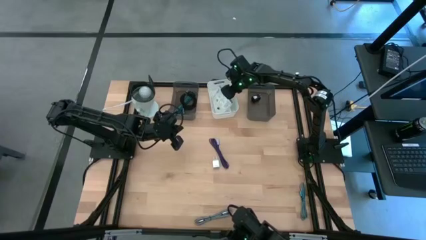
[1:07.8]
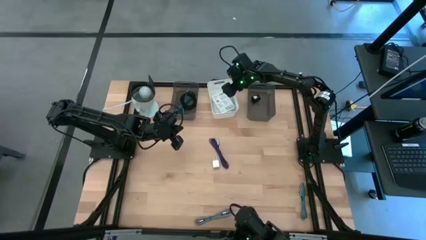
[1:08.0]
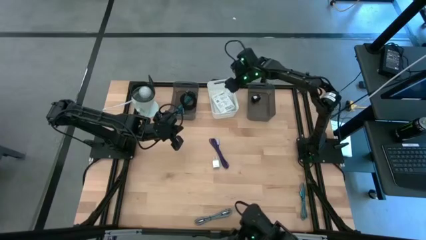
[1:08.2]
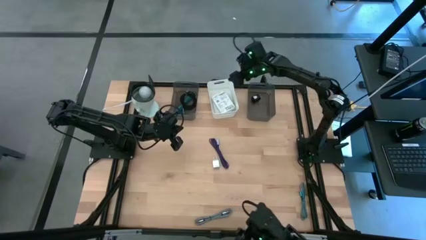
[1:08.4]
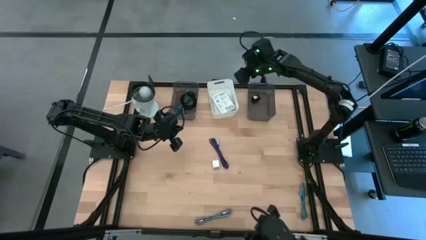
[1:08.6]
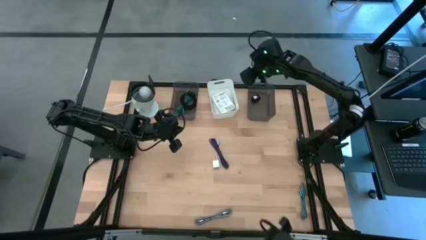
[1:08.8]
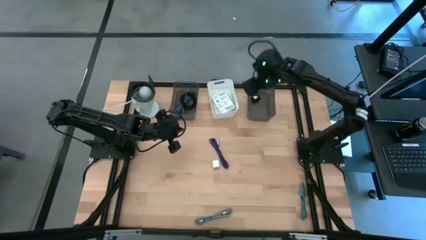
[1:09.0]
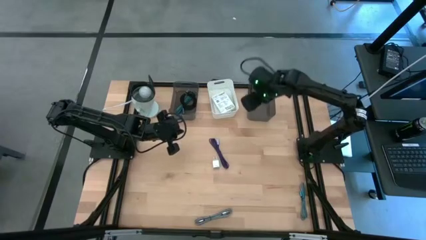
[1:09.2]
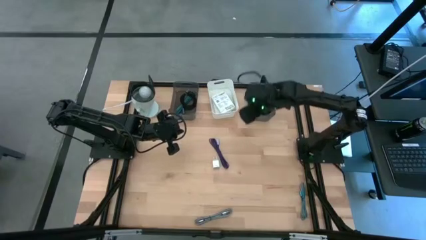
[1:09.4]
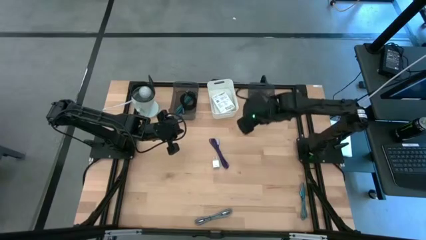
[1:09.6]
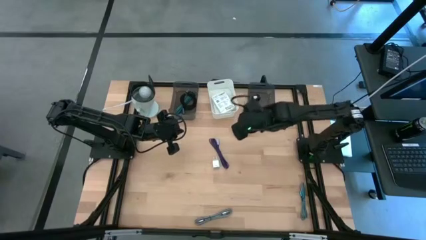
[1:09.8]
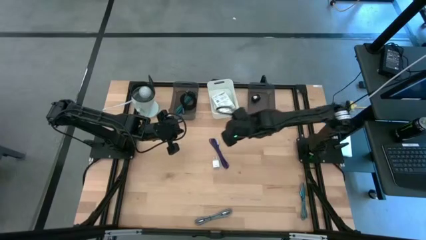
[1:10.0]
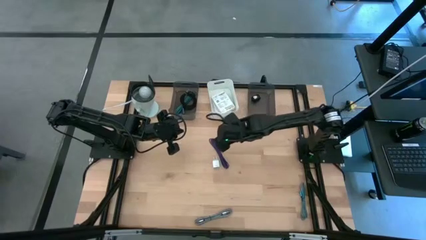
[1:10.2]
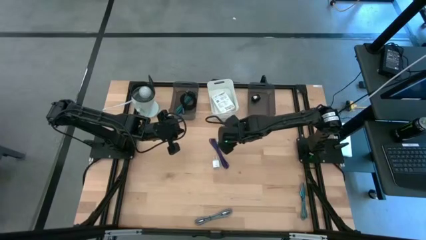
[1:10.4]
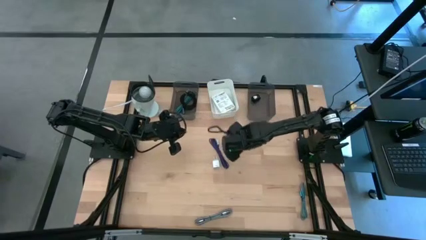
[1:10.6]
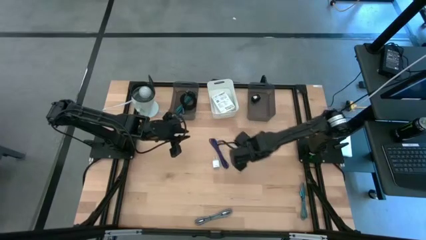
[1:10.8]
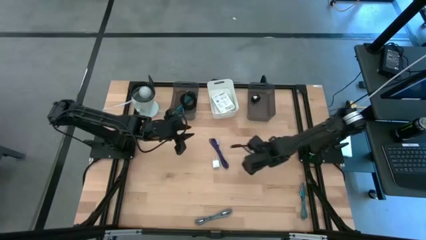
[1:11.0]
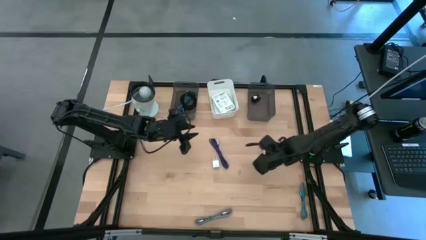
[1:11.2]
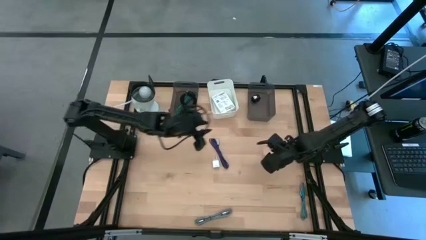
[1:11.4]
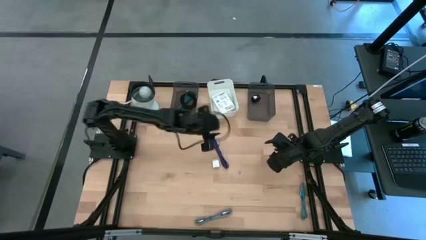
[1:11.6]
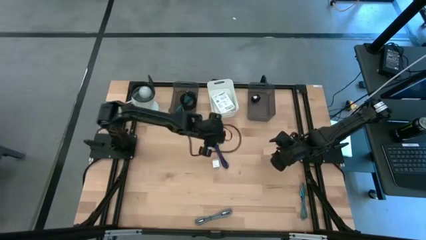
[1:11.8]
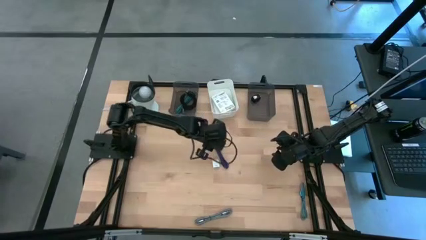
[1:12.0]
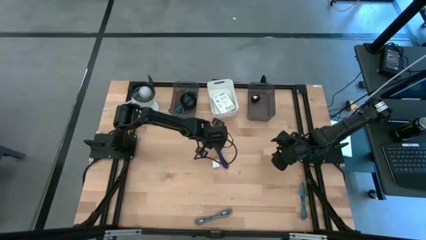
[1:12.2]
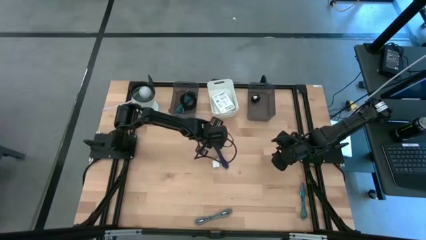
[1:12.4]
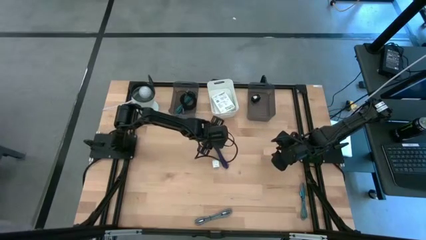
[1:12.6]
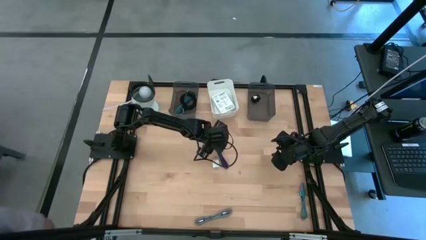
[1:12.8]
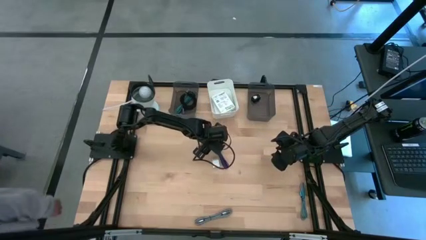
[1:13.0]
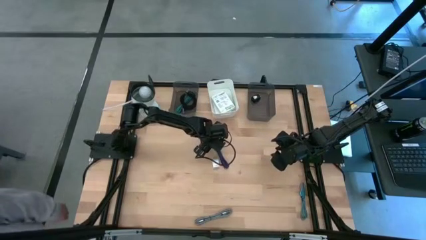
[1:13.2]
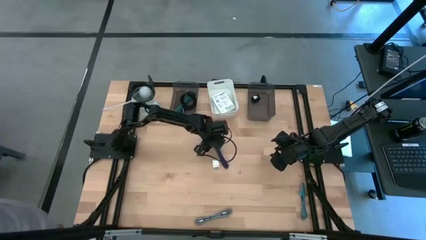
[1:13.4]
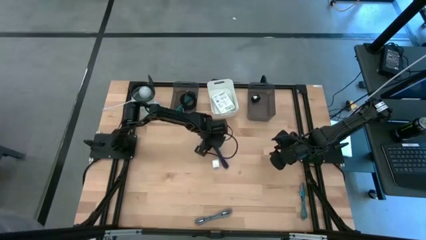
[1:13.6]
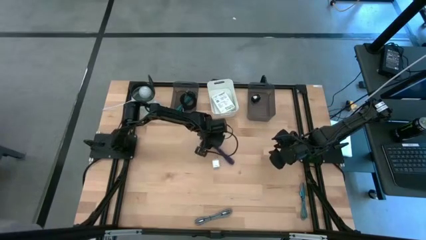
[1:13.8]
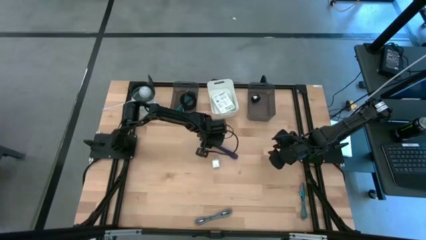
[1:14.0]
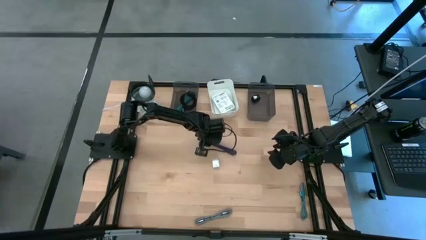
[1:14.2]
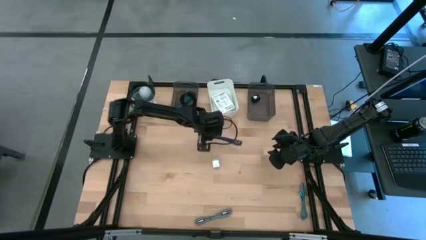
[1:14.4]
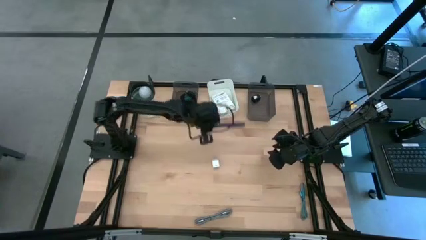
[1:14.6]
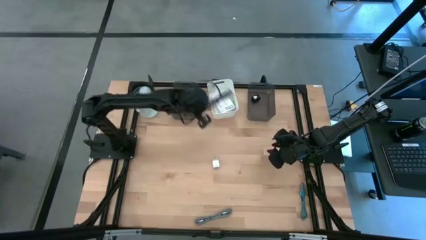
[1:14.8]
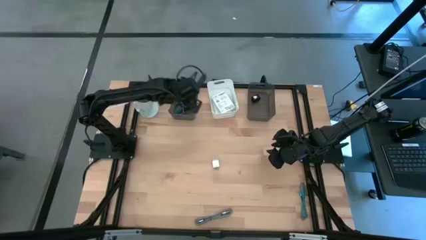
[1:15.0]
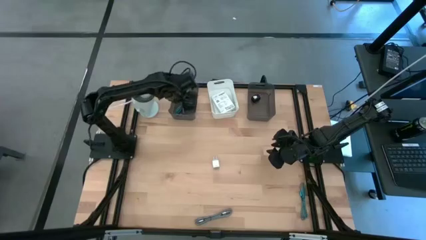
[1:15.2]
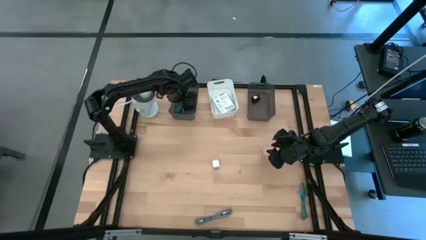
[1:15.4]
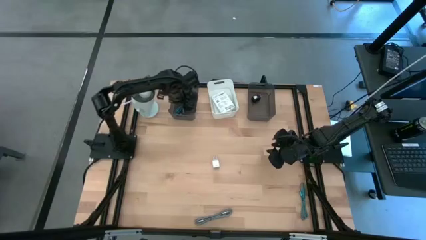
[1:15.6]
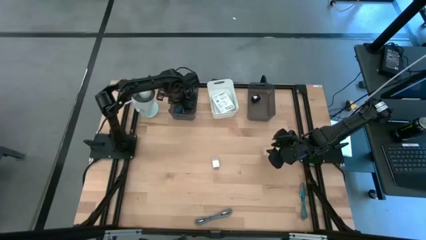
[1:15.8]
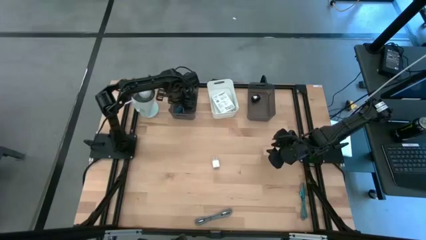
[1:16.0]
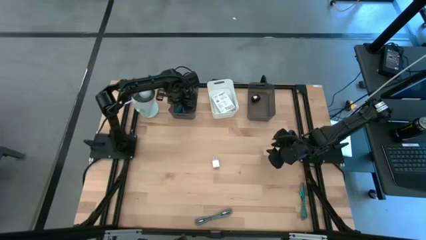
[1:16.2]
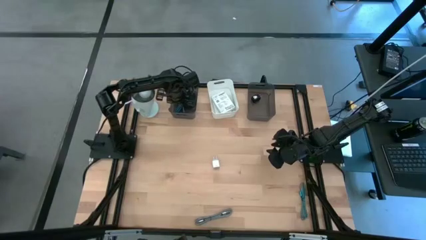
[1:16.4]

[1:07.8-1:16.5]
Task: Pick and place items into bin
Put the dark blue charger cable into the left black bin
